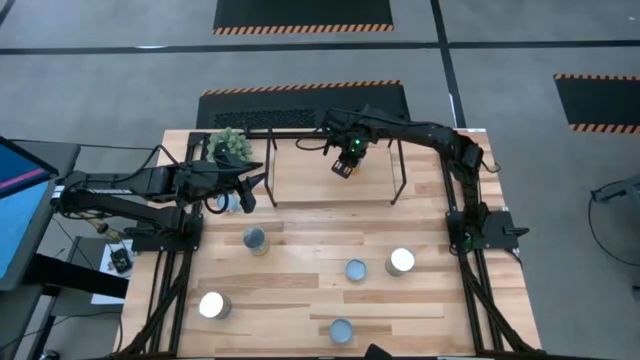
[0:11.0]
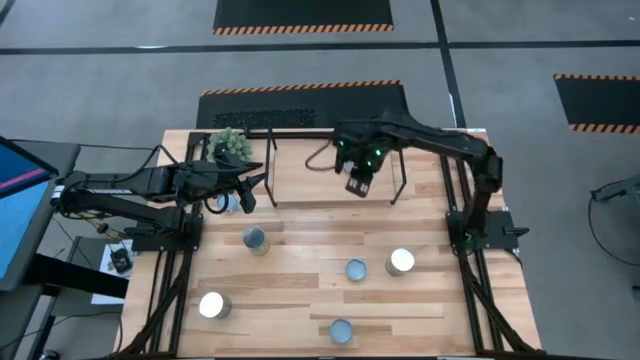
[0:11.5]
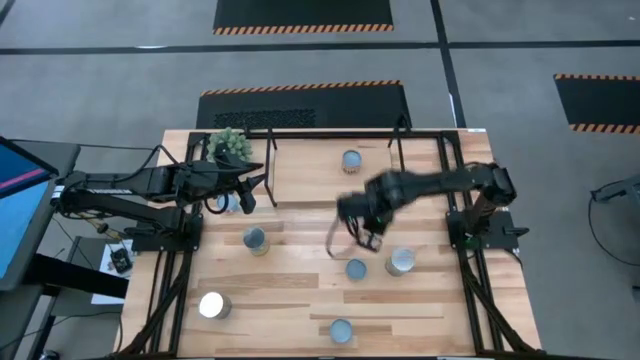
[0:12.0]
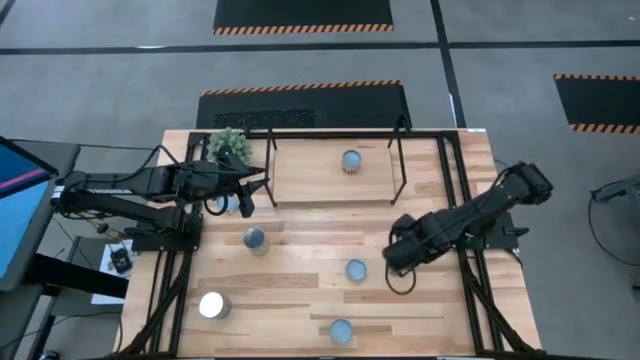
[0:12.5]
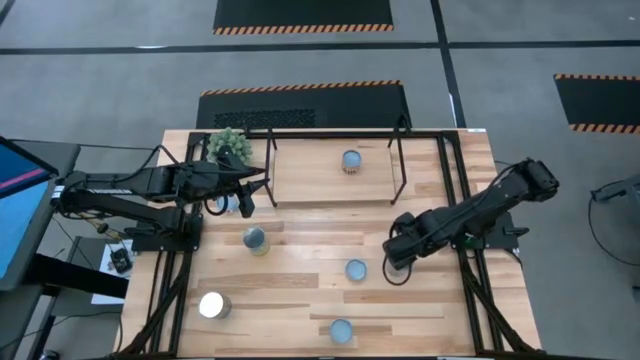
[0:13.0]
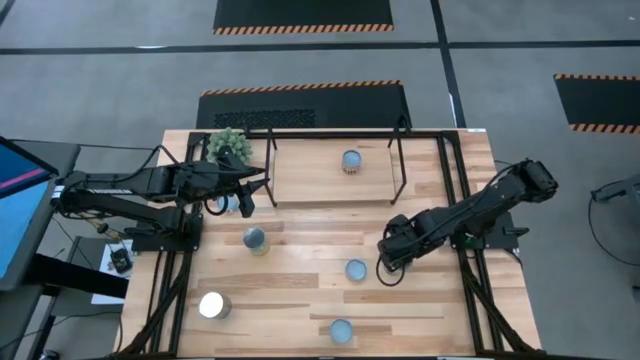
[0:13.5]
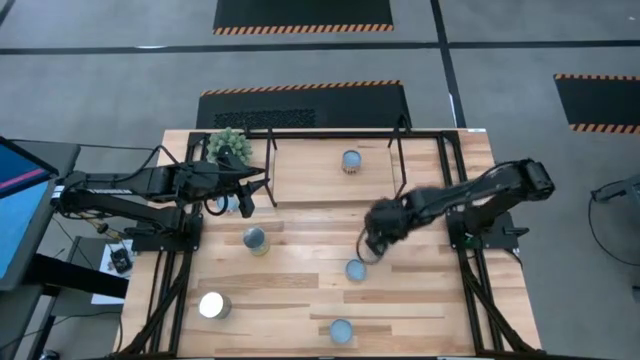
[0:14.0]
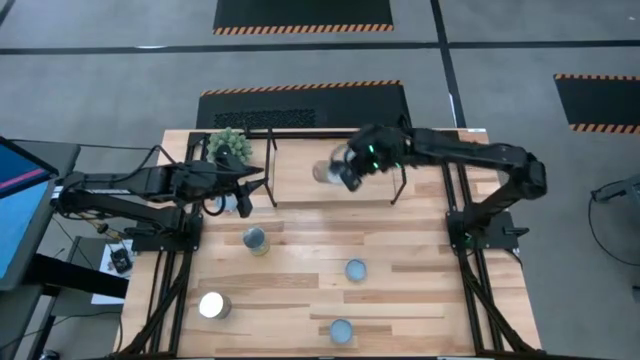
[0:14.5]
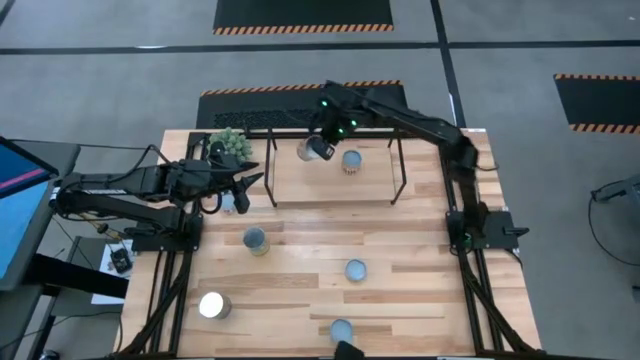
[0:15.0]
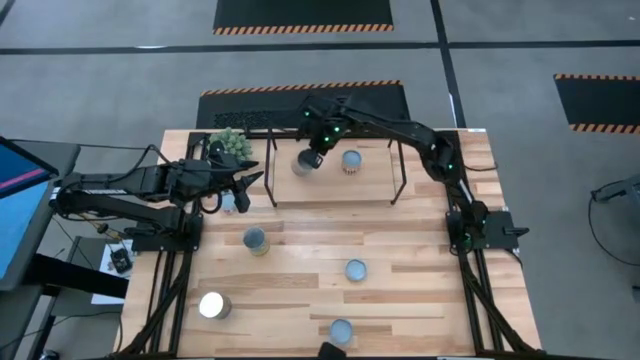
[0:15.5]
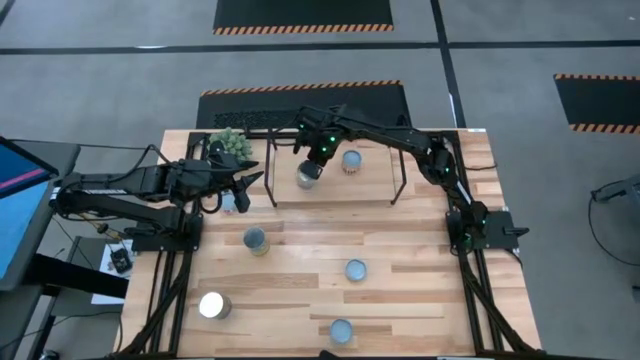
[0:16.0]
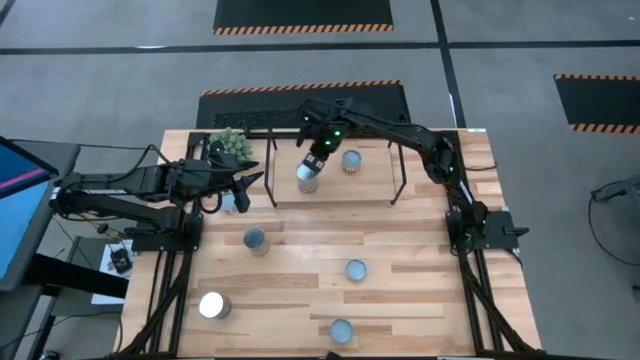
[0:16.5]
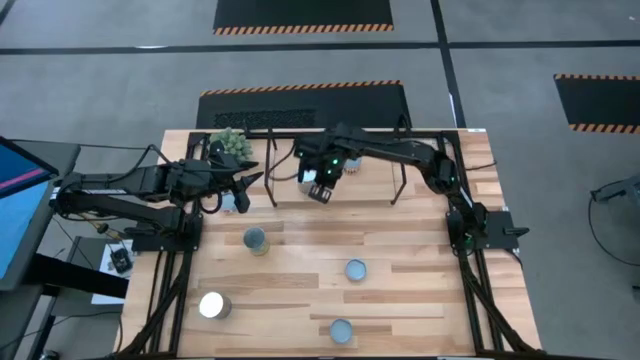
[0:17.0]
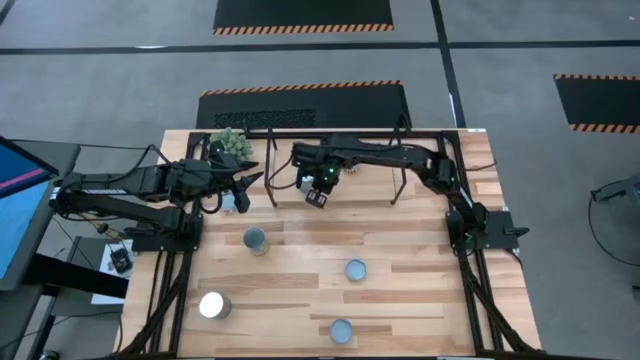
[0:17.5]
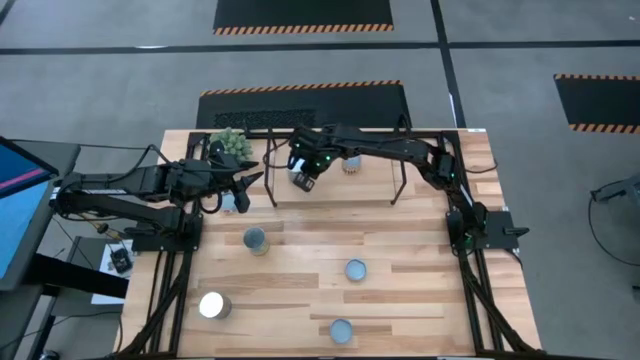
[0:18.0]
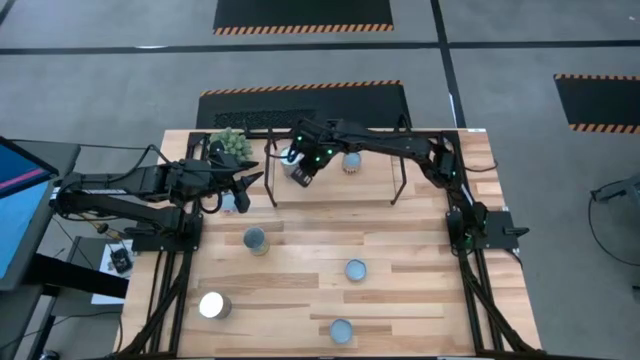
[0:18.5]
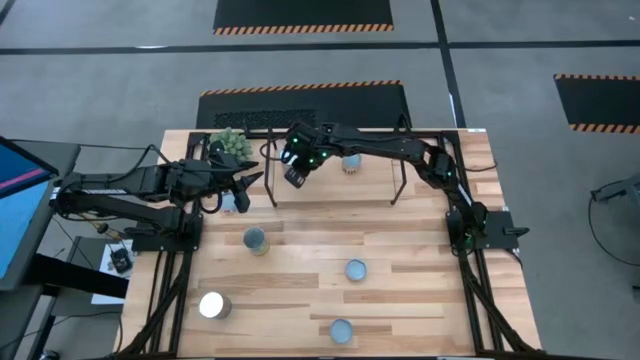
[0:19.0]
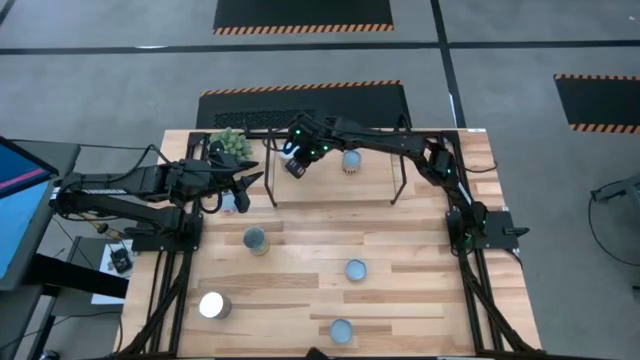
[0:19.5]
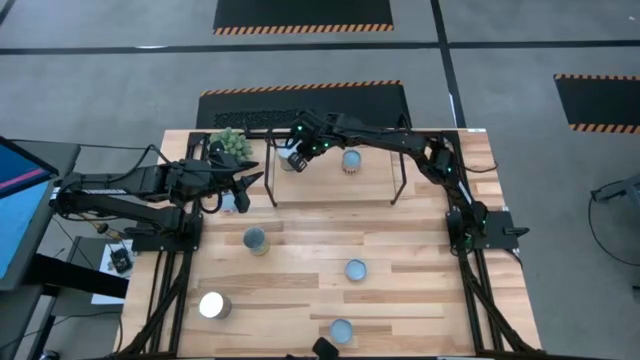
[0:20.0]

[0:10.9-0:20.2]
Task: Pick and place cans onto a shelf
Put the canned peaches on the shelf

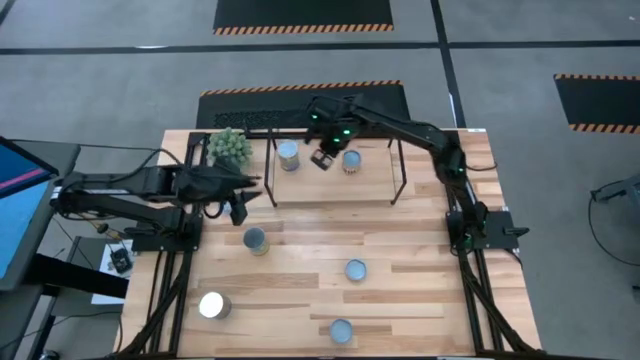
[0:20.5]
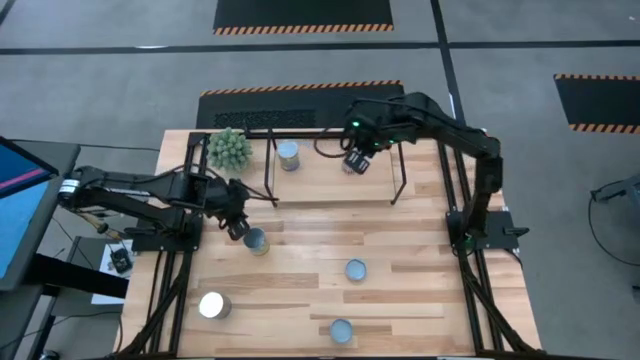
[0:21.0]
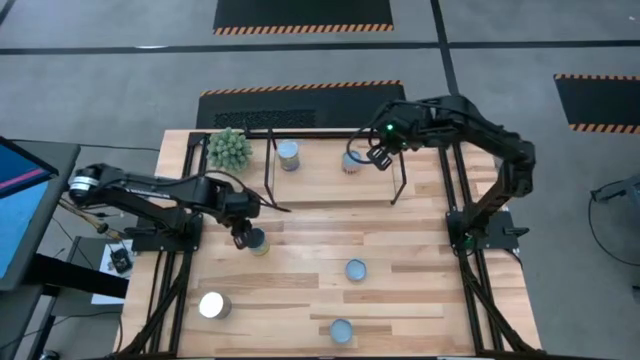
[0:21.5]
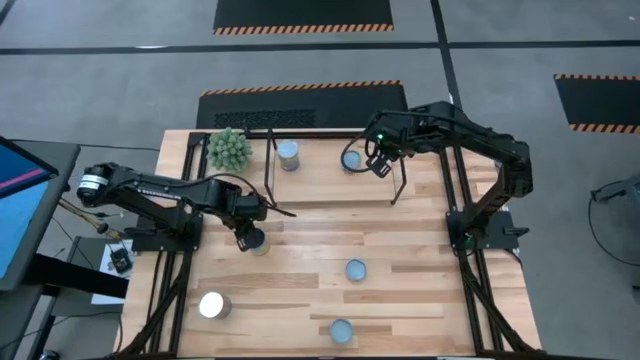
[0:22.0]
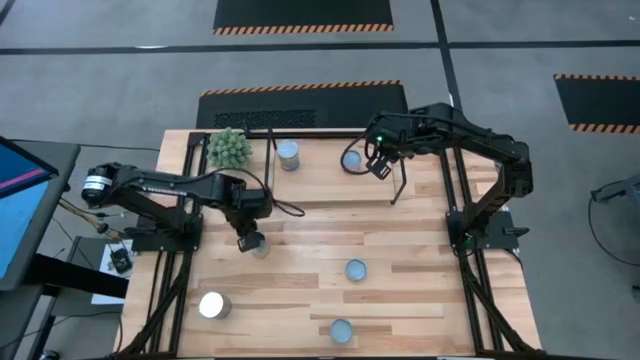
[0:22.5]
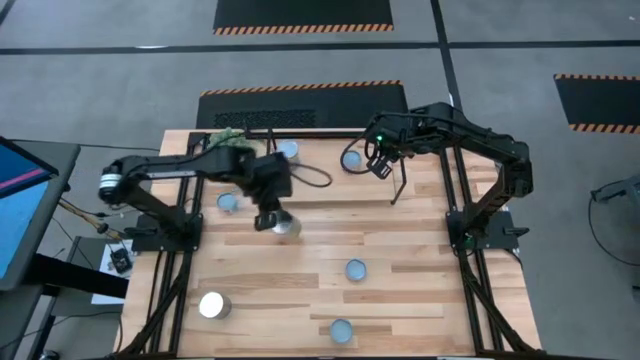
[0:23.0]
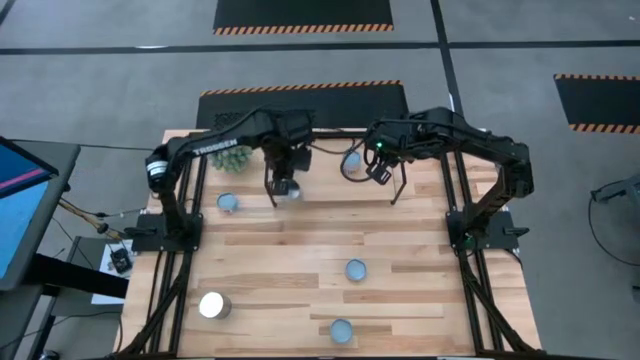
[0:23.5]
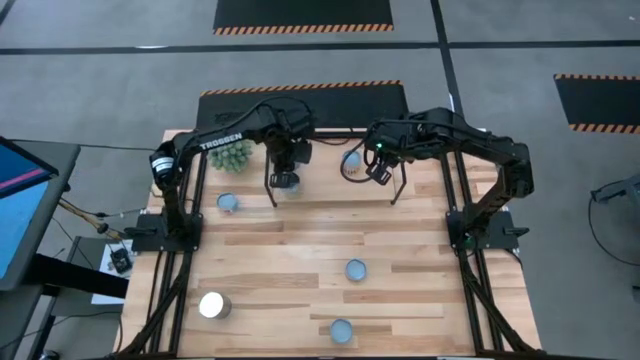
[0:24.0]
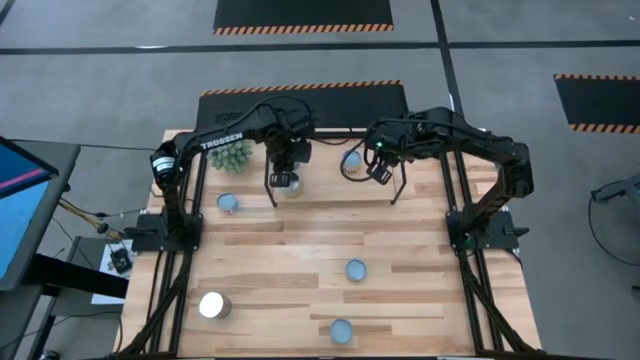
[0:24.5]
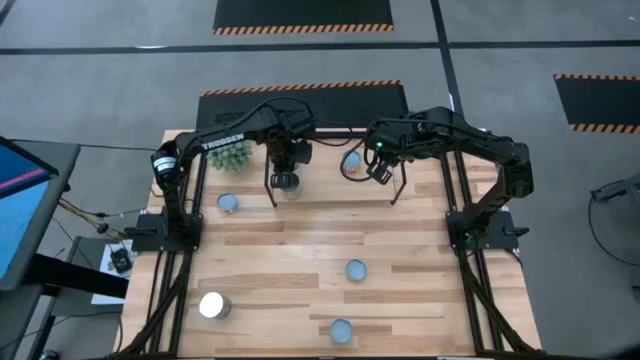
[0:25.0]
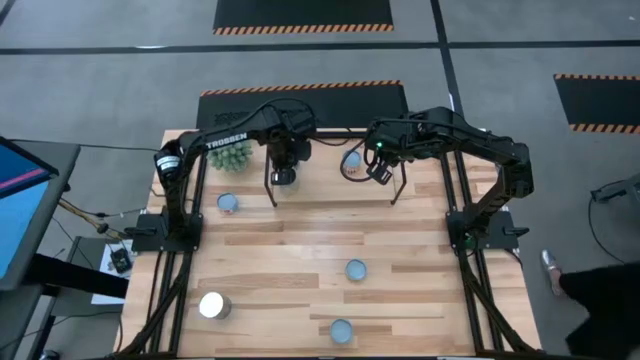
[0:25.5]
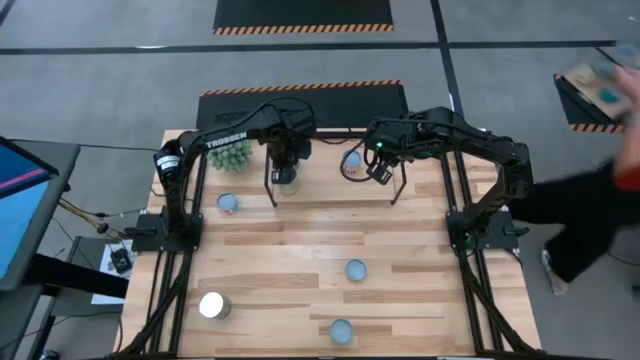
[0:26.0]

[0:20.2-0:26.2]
Put the canned carrots on the shelf

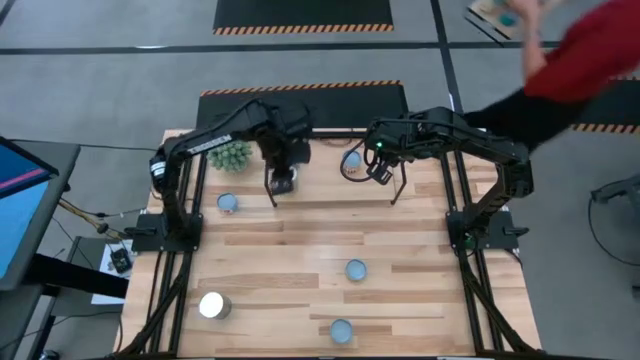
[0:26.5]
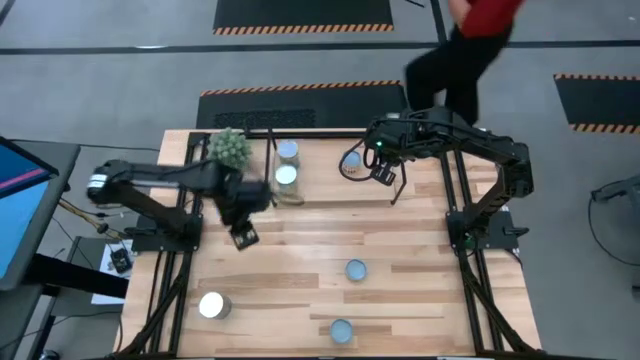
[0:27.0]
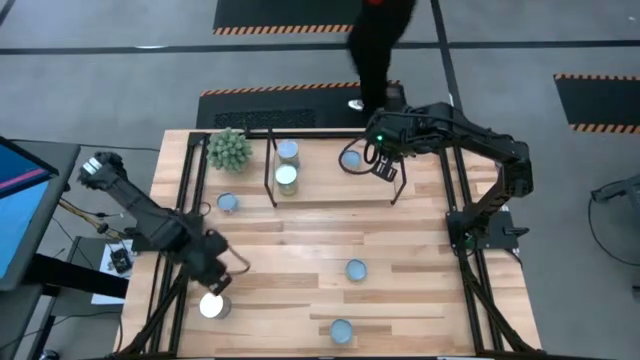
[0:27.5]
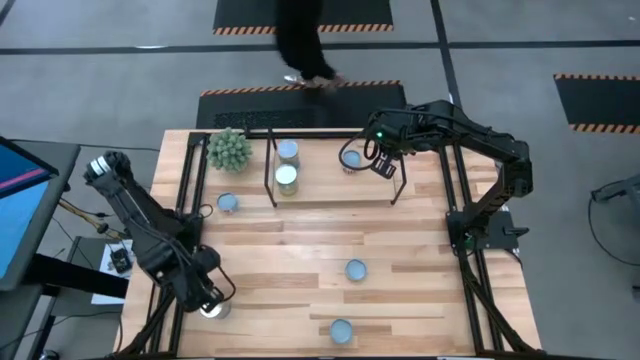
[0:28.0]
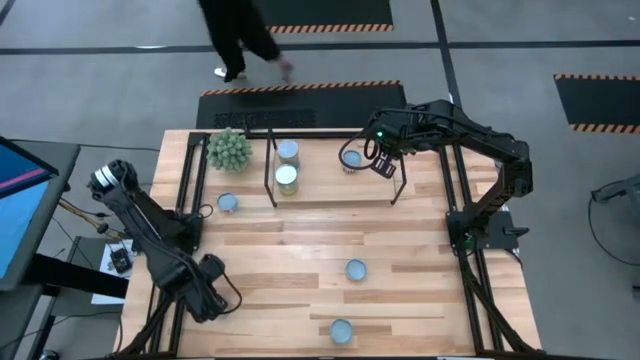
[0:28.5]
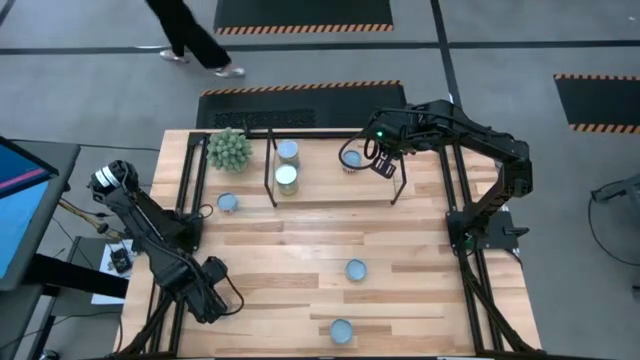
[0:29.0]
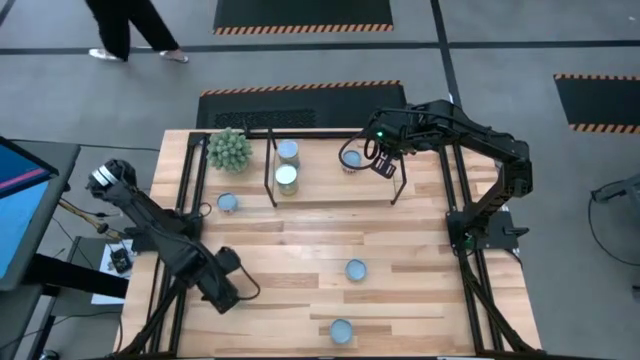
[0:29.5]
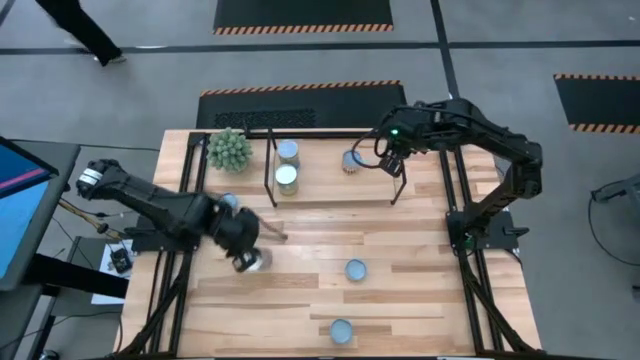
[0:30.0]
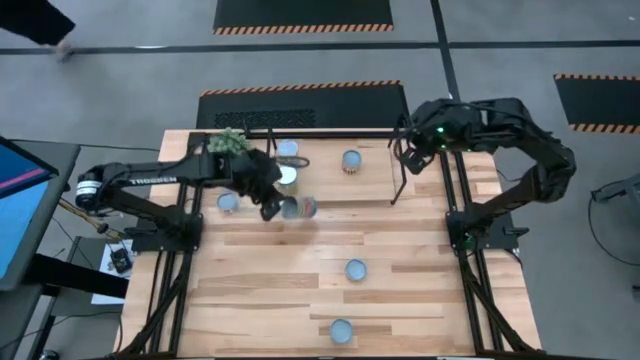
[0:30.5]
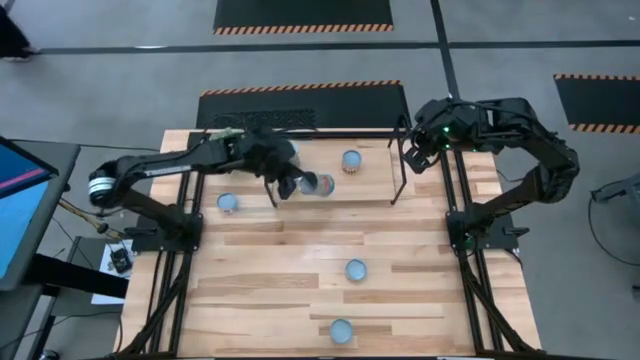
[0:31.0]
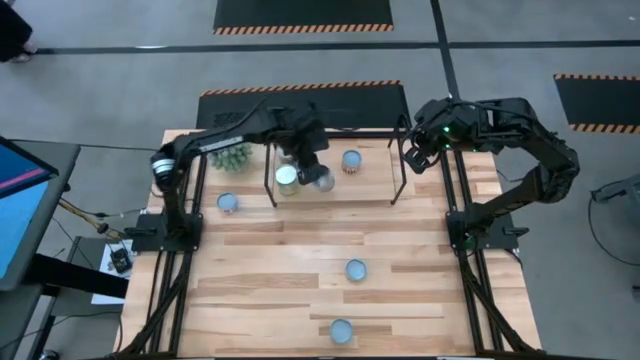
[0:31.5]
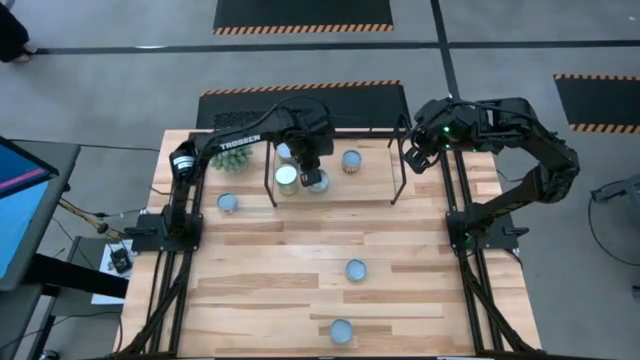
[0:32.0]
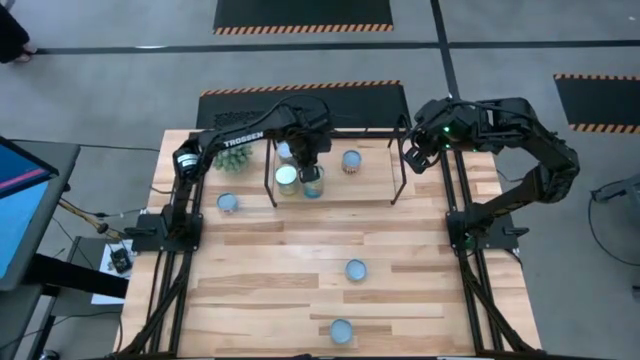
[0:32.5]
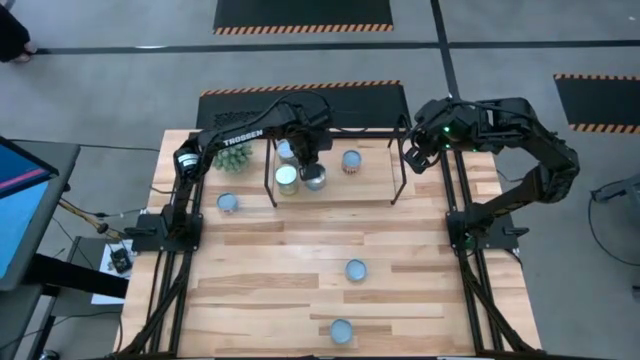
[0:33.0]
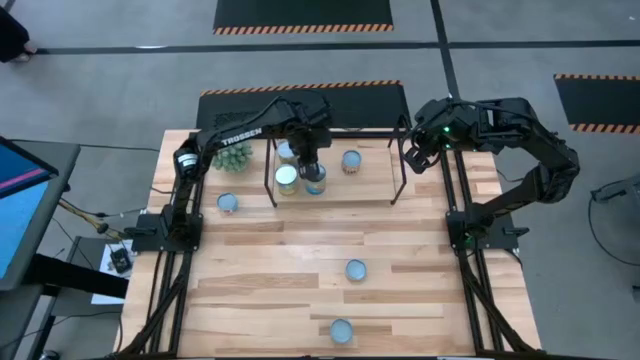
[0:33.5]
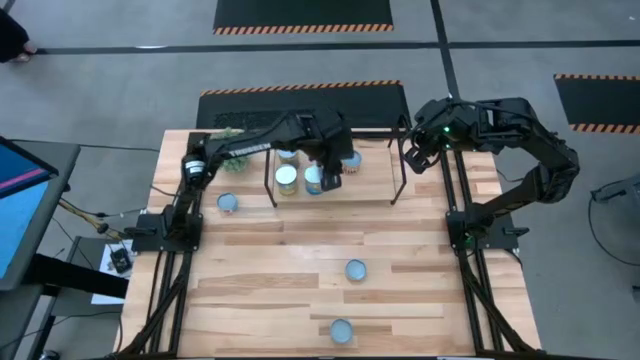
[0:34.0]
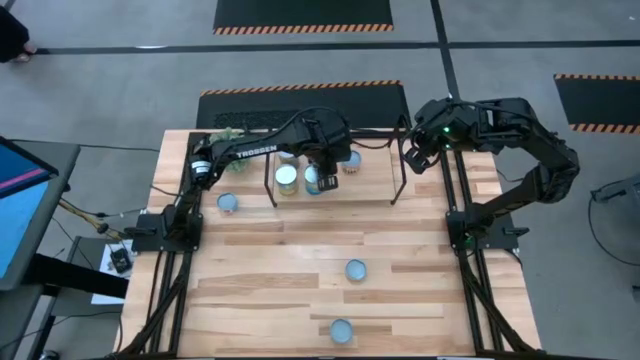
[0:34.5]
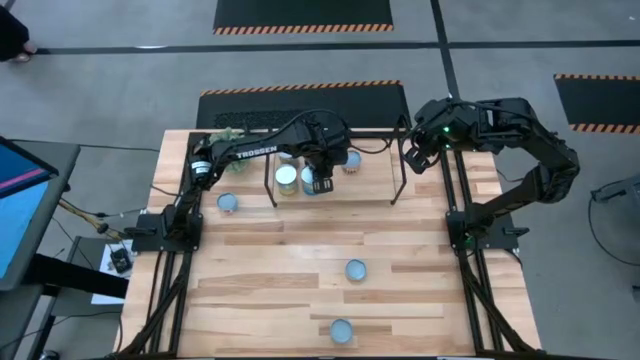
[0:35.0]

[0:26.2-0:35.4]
Put the canned tomato on the shelf
